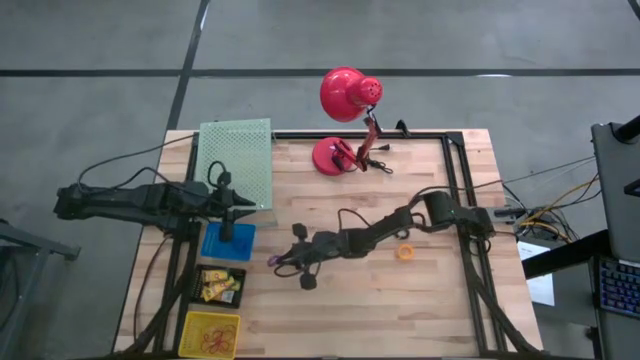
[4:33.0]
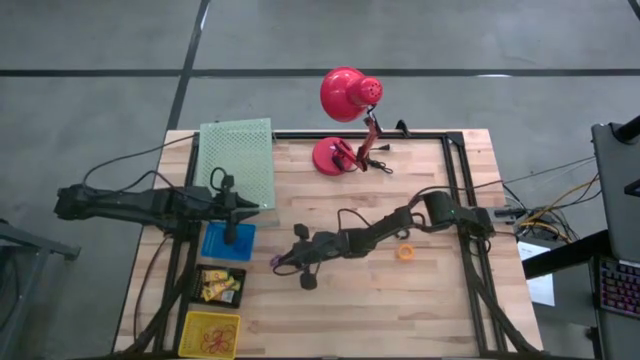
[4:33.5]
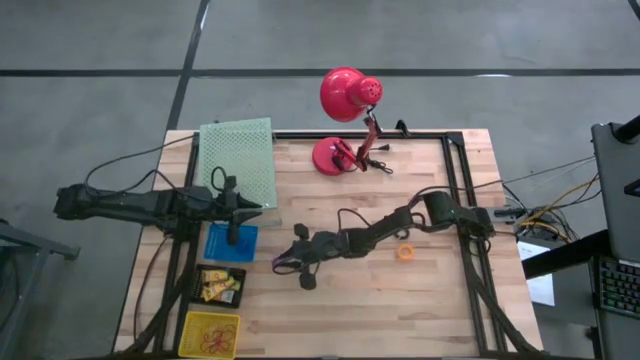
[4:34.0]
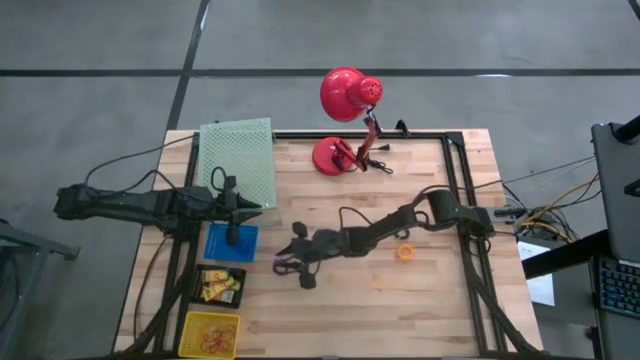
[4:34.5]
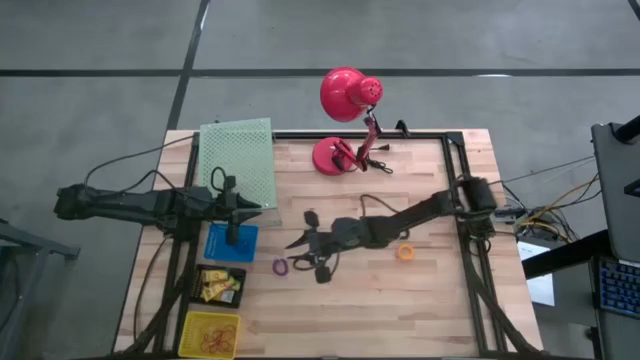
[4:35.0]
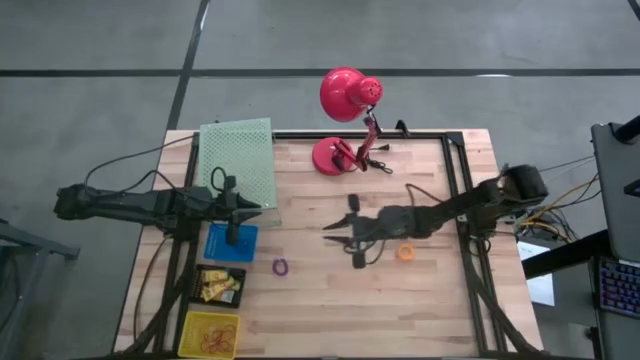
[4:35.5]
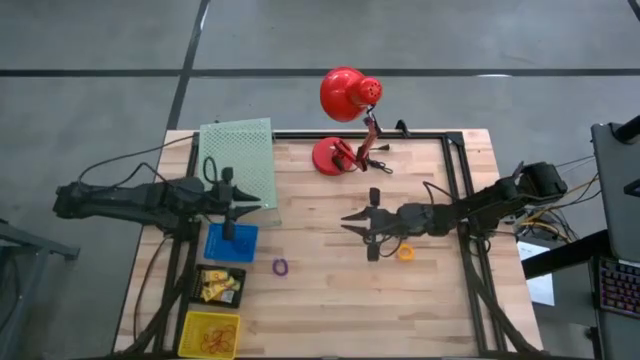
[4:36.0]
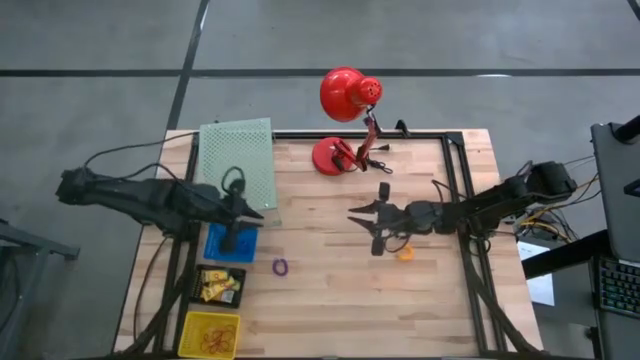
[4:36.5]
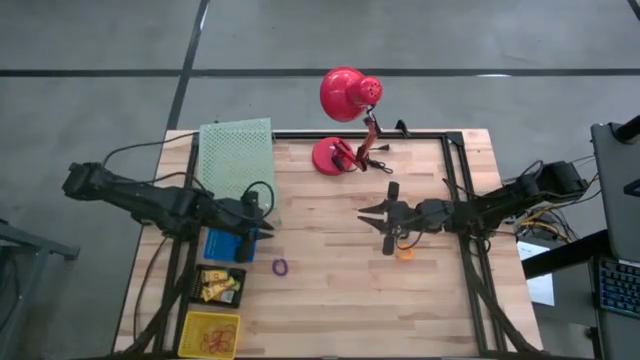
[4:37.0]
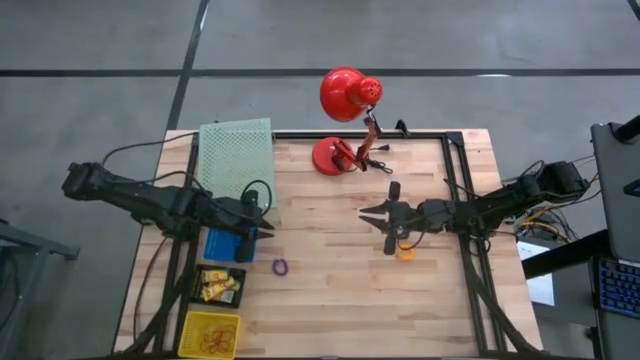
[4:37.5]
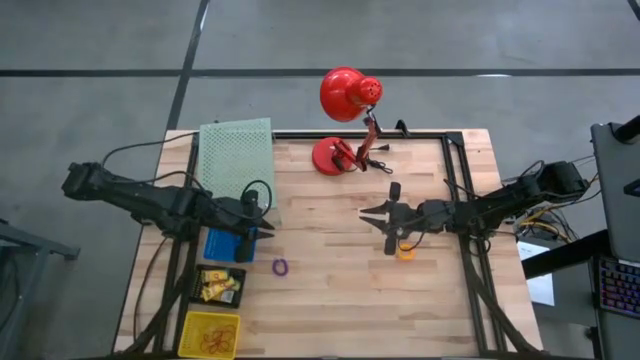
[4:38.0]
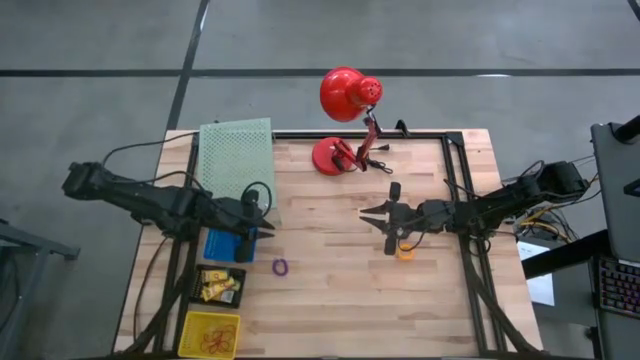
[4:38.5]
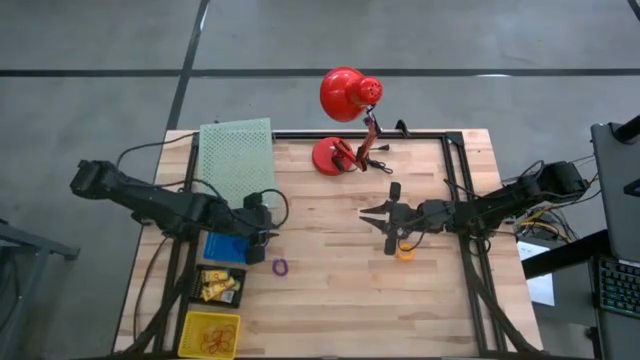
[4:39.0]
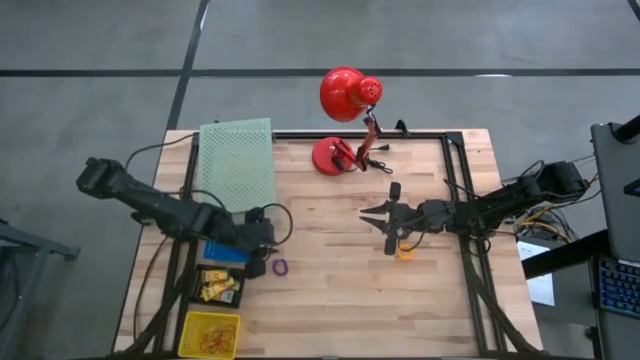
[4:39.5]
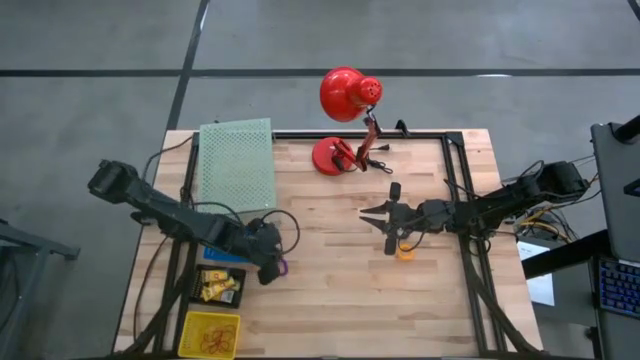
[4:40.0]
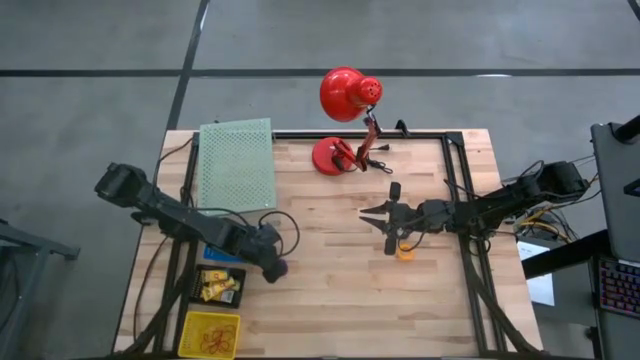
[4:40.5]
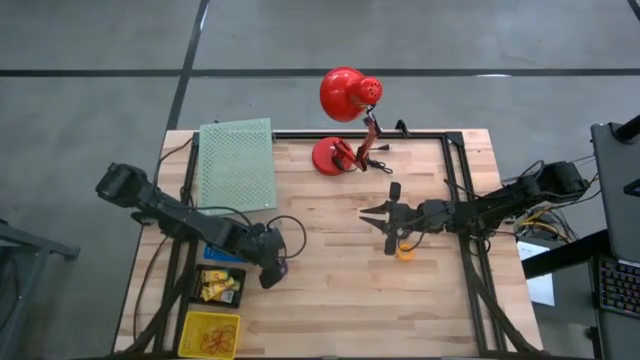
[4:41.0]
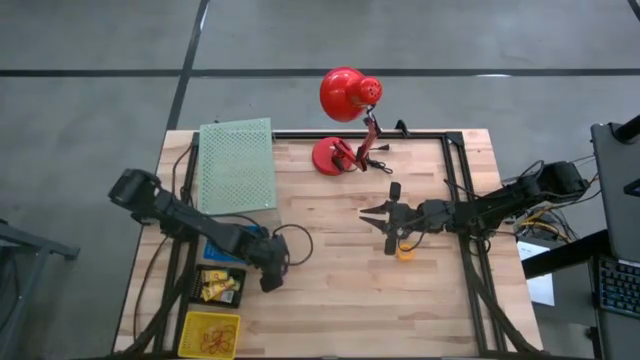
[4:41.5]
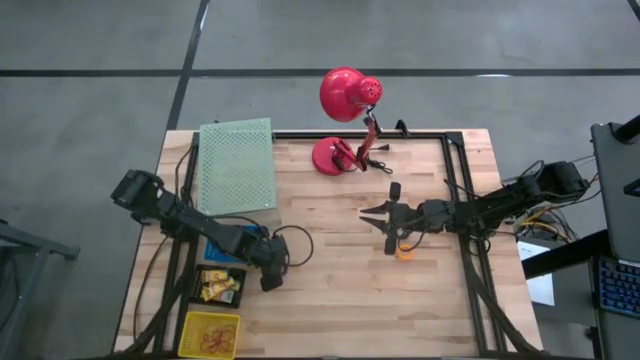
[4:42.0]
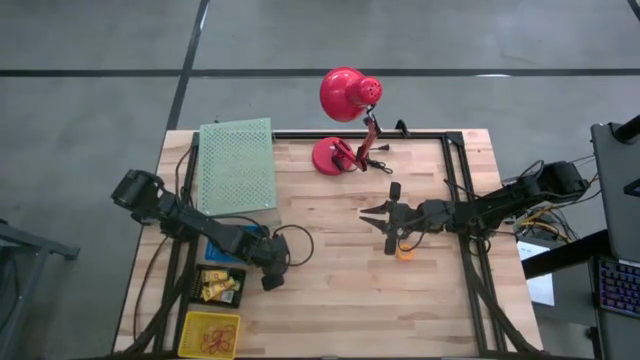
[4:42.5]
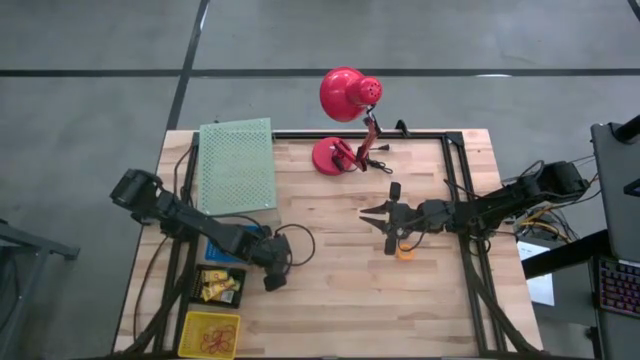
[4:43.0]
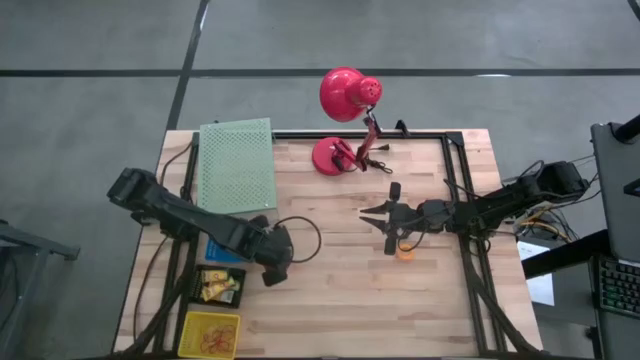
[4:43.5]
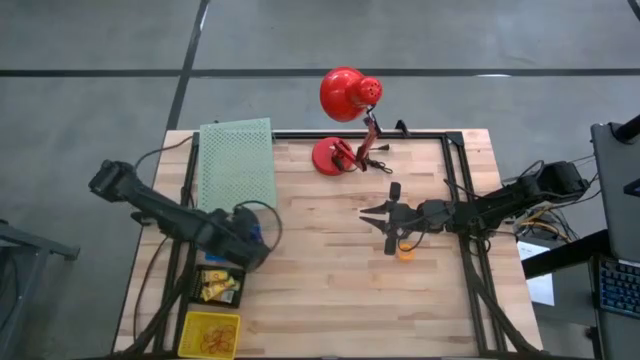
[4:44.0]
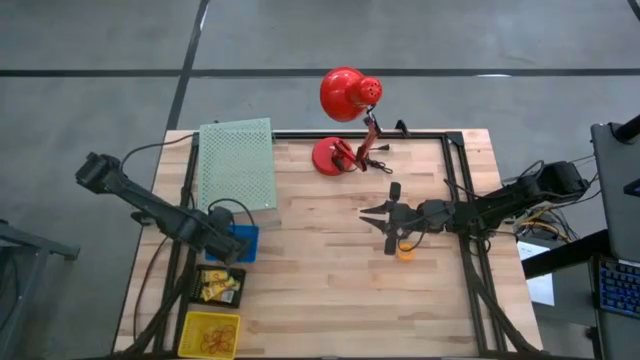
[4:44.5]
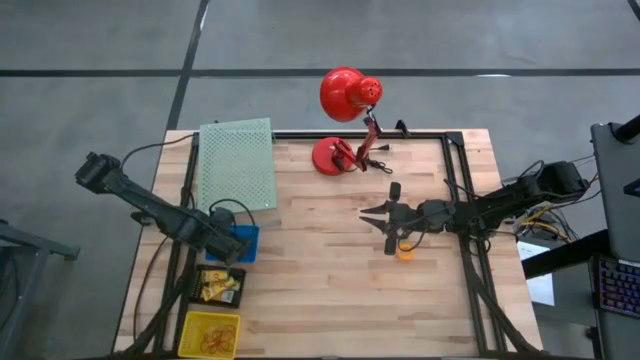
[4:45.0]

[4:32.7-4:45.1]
Task: Pick & Place Office Desk Supplies
Put the purple spring rubber band into the blue bin

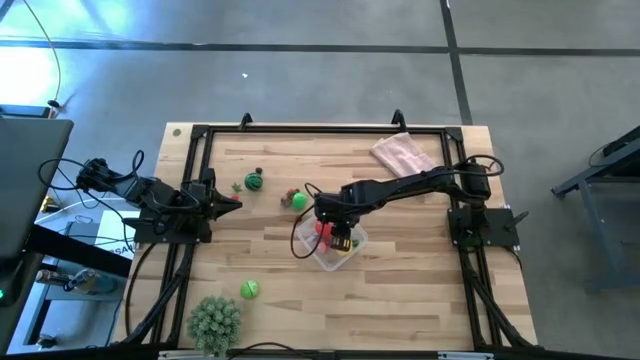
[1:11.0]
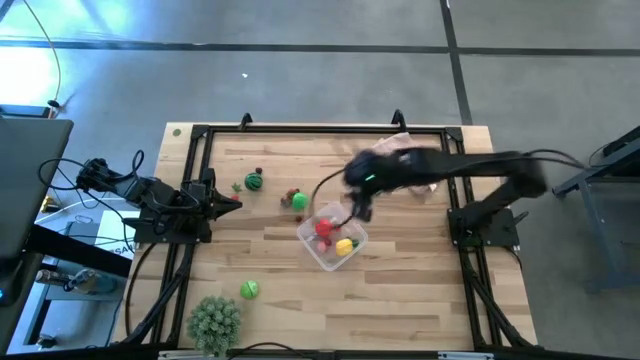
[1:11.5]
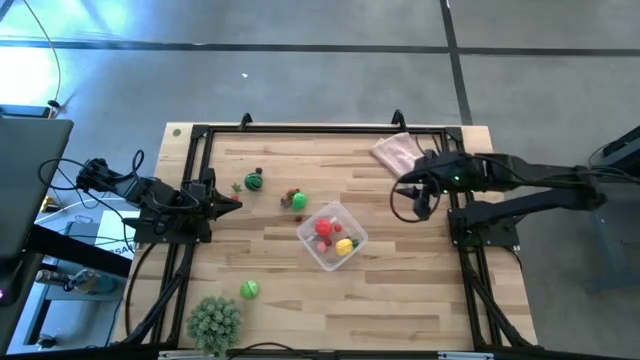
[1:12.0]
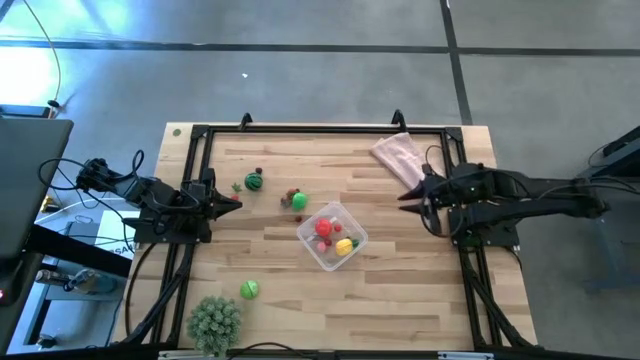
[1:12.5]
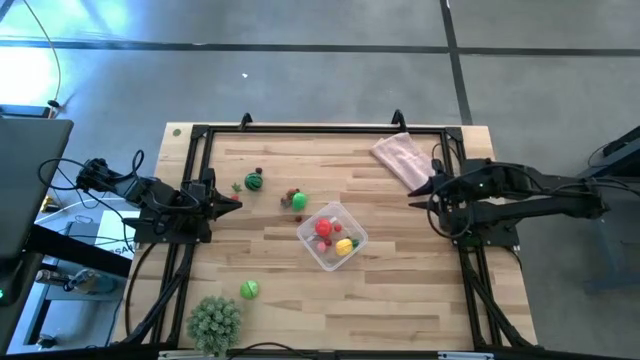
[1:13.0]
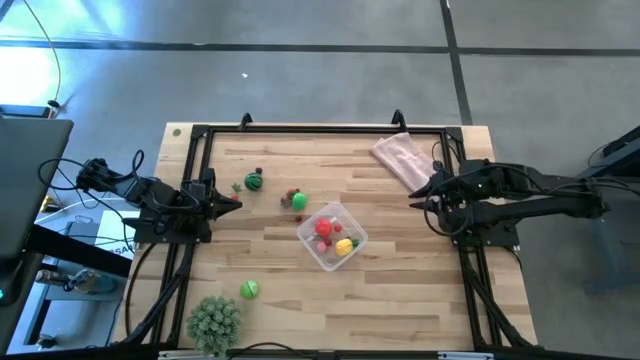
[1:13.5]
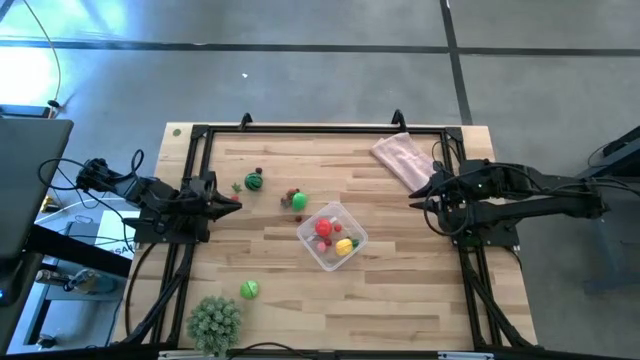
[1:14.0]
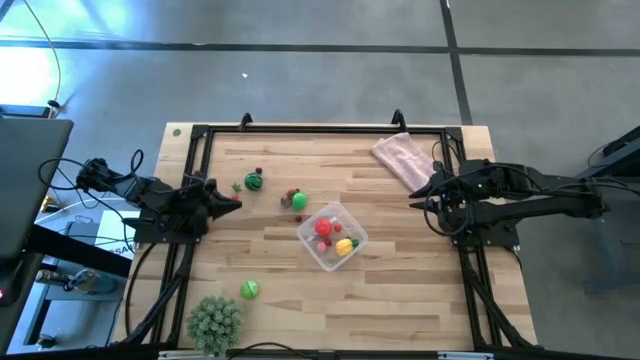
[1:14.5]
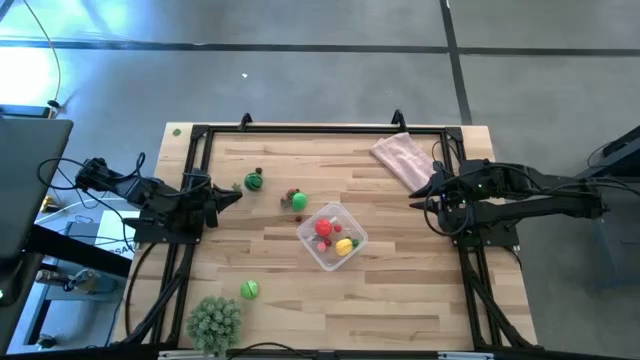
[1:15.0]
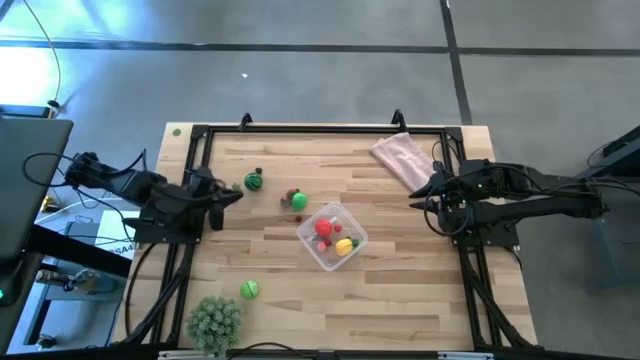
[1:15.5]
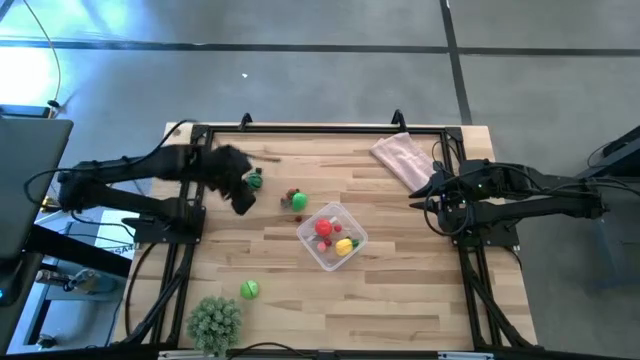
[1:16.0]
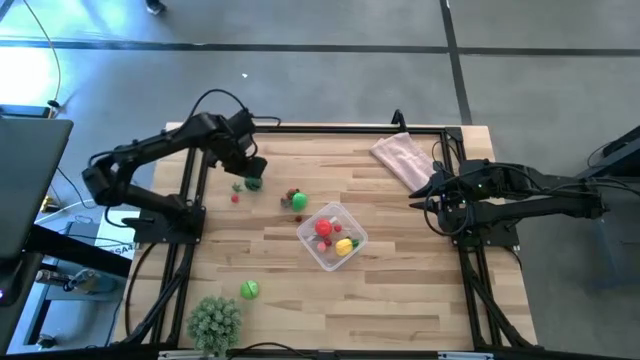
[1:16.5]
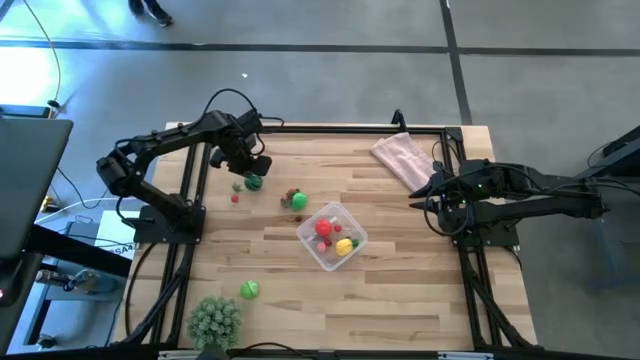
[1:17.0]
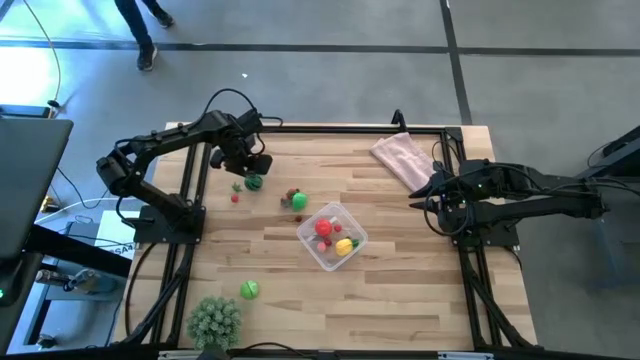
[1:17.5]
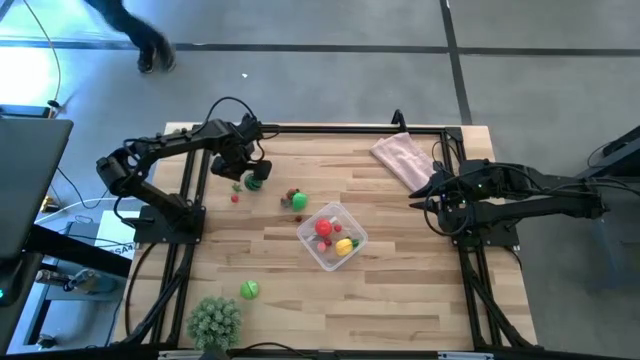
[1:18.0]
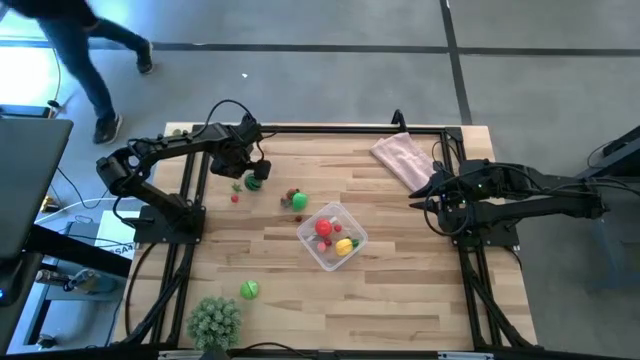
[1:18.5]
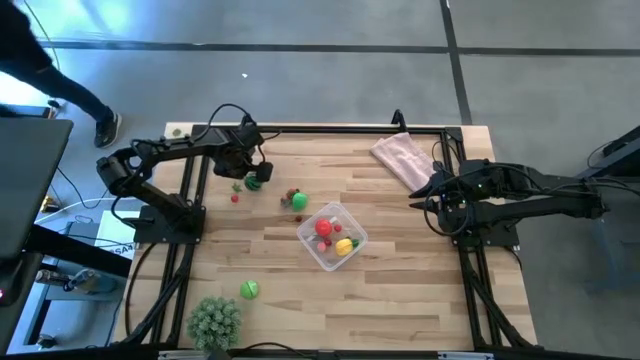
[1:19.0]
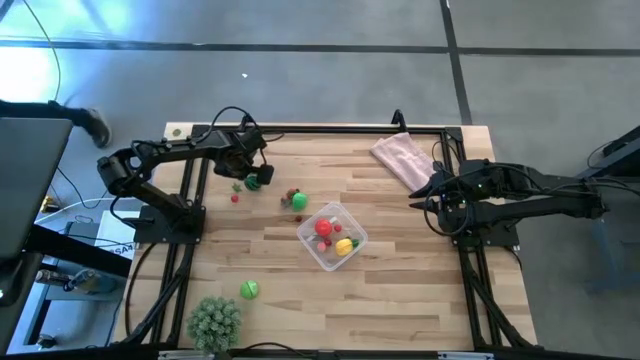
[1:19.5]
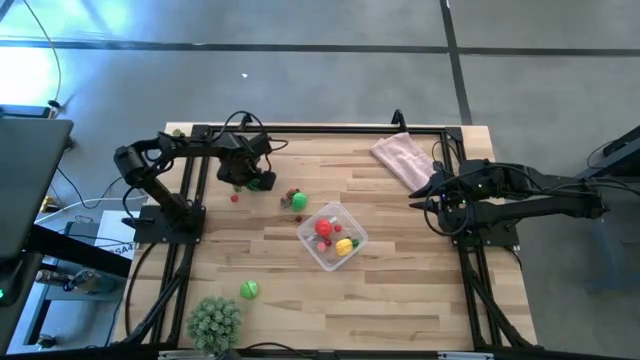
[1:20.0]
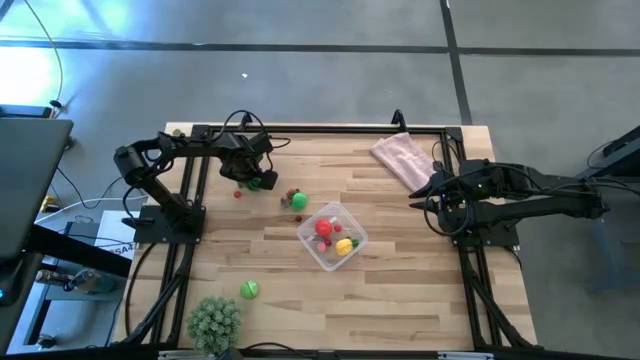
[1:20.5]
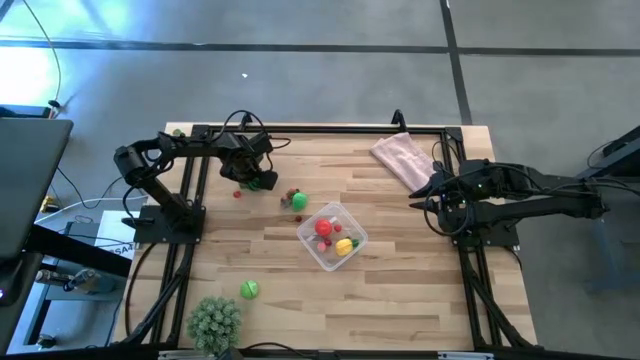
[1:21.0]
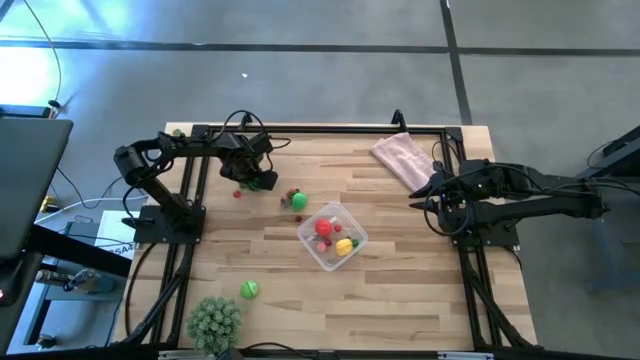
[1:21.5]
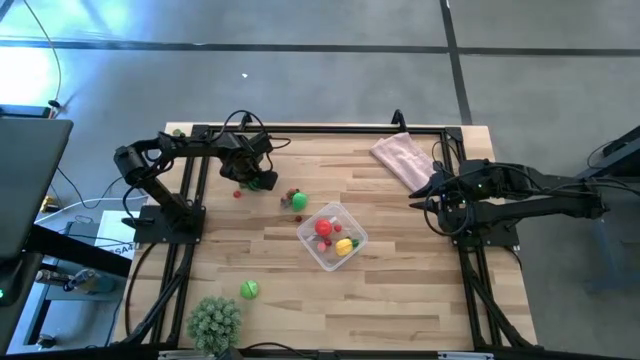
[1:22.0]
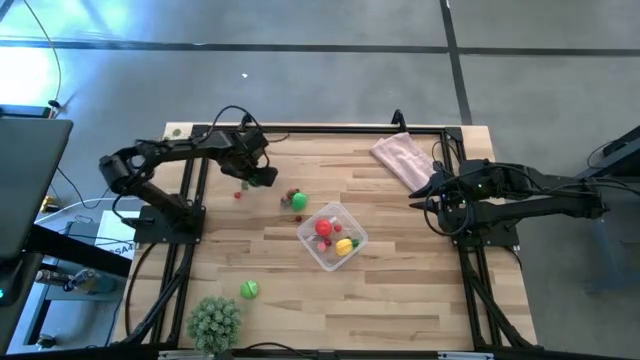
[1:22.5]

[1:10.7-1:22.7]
Task: Pick and placing Produce into tupperware
Put the green watermelon into the transparent container
